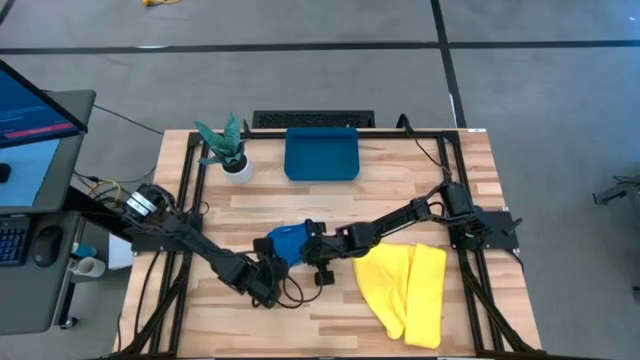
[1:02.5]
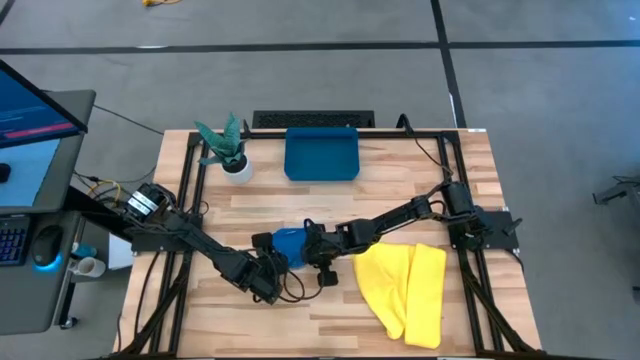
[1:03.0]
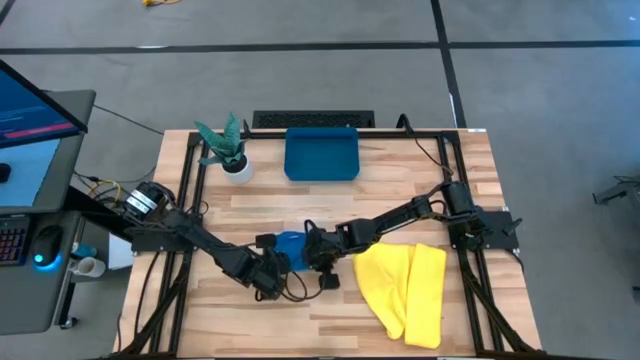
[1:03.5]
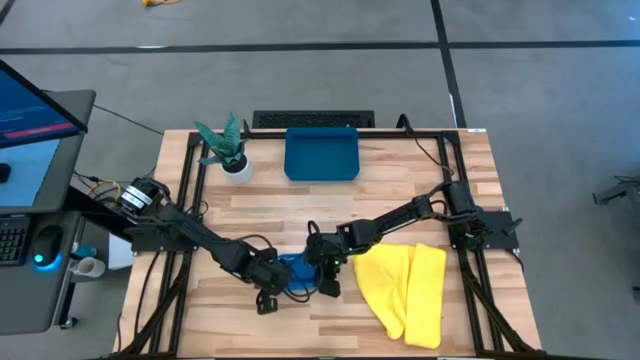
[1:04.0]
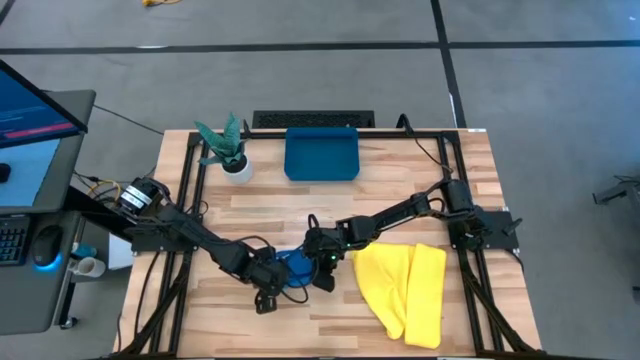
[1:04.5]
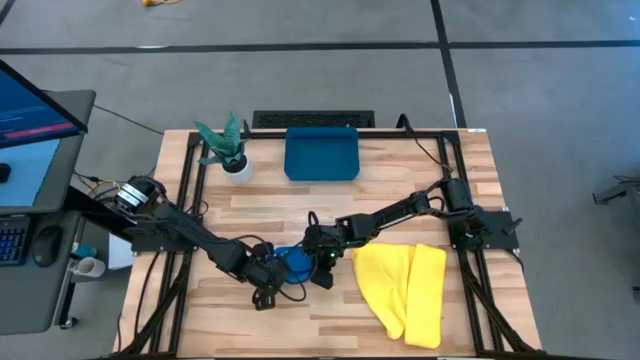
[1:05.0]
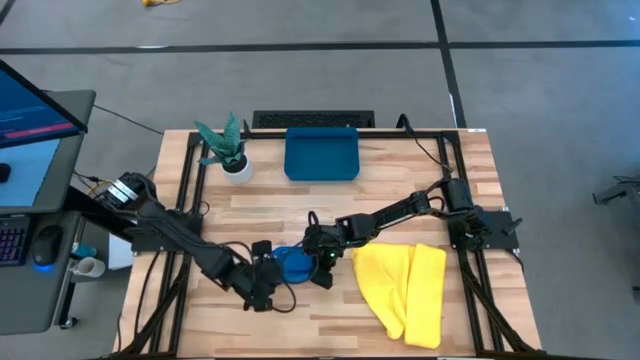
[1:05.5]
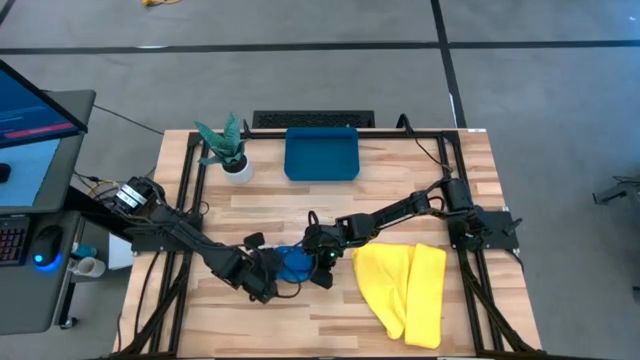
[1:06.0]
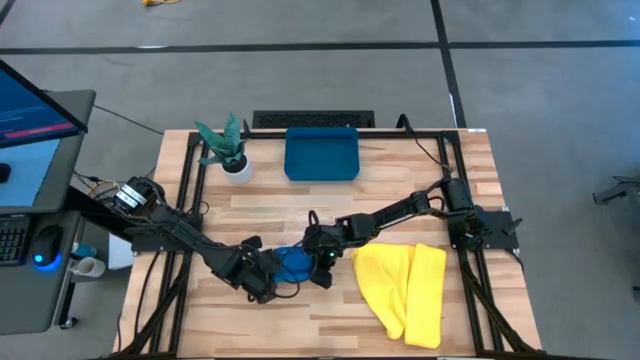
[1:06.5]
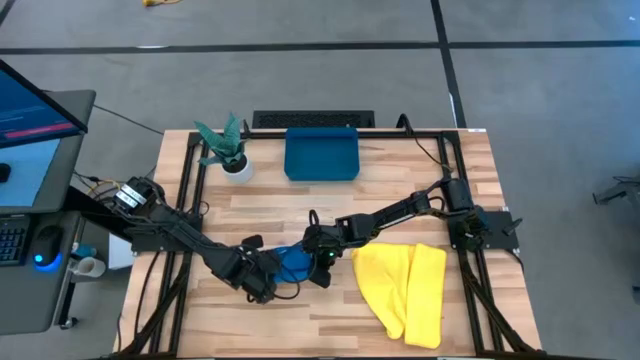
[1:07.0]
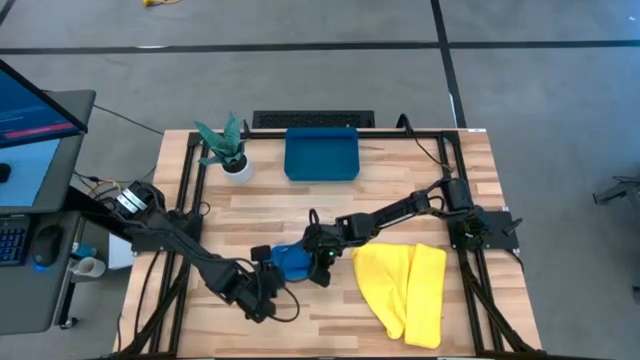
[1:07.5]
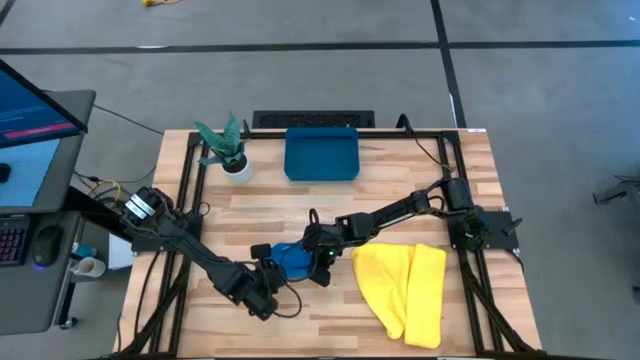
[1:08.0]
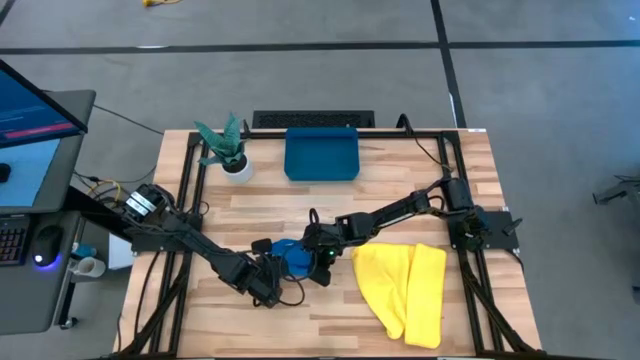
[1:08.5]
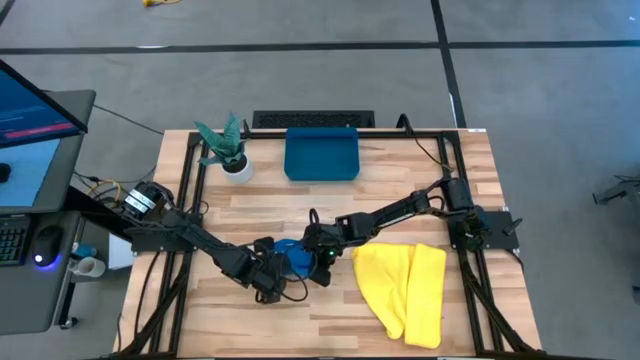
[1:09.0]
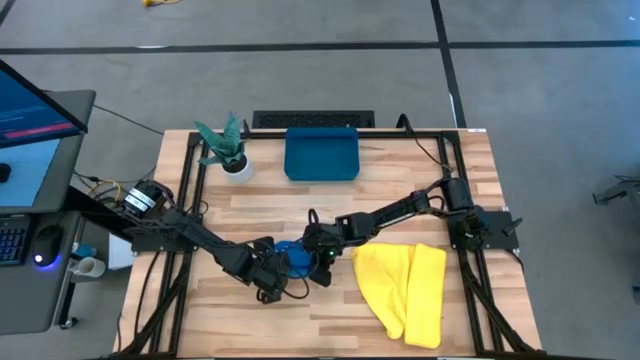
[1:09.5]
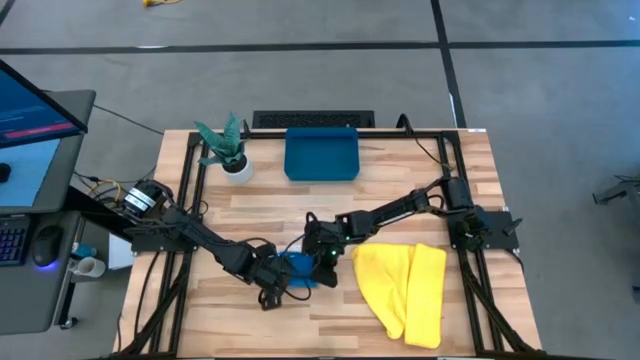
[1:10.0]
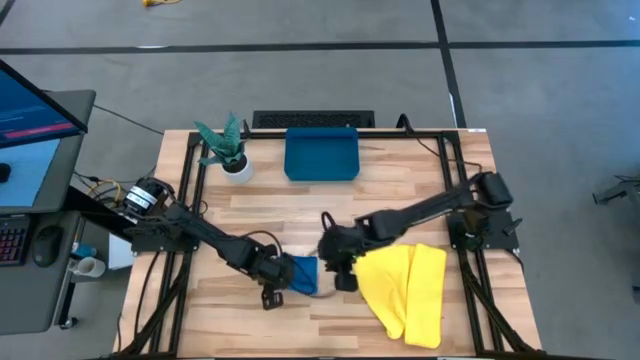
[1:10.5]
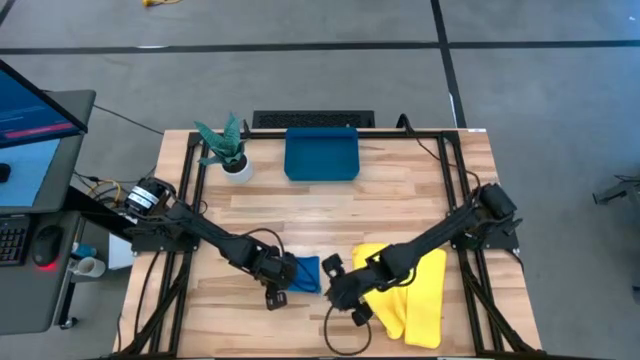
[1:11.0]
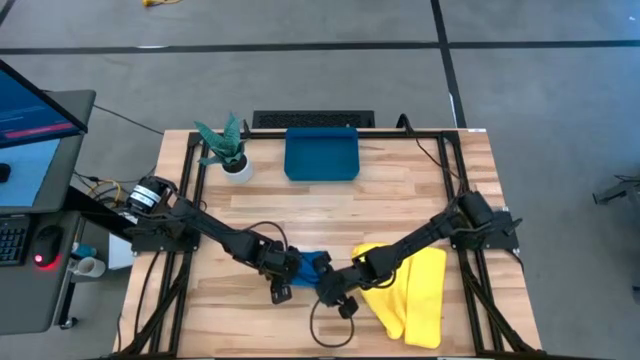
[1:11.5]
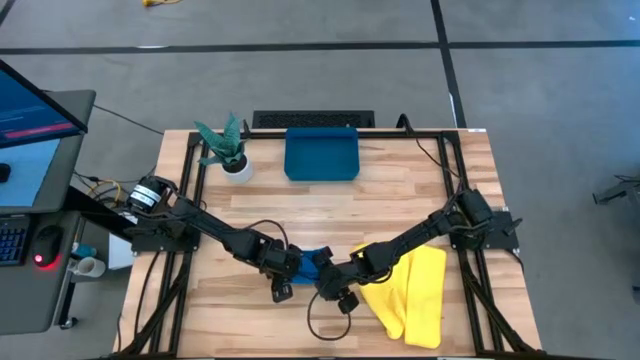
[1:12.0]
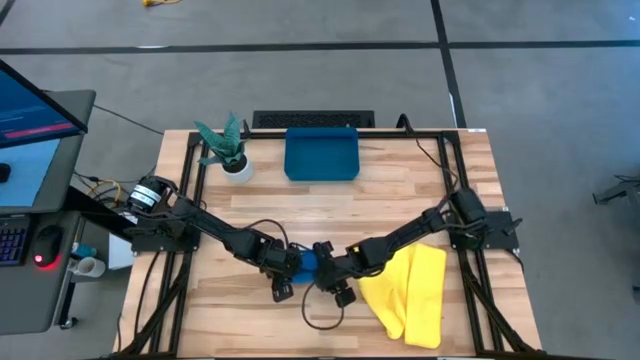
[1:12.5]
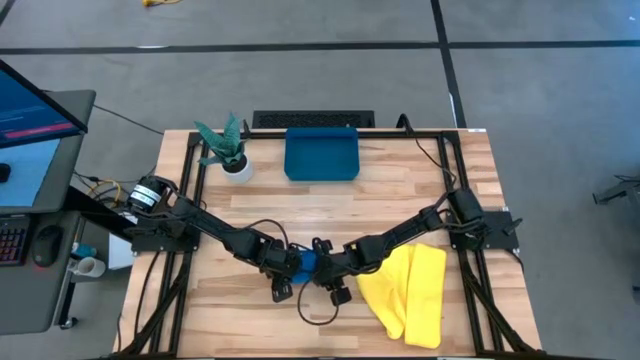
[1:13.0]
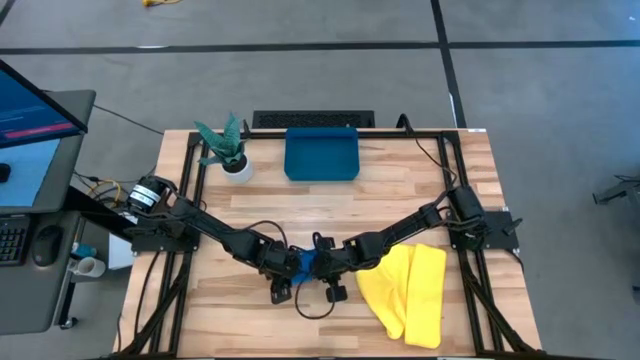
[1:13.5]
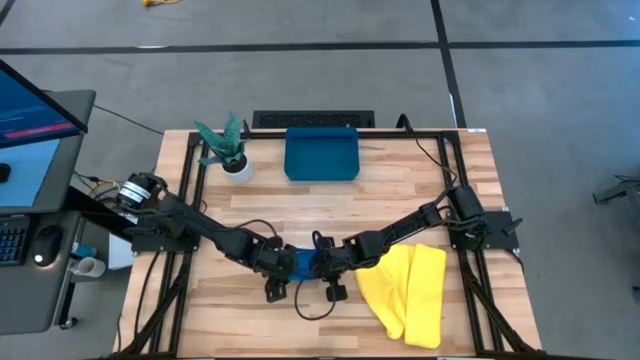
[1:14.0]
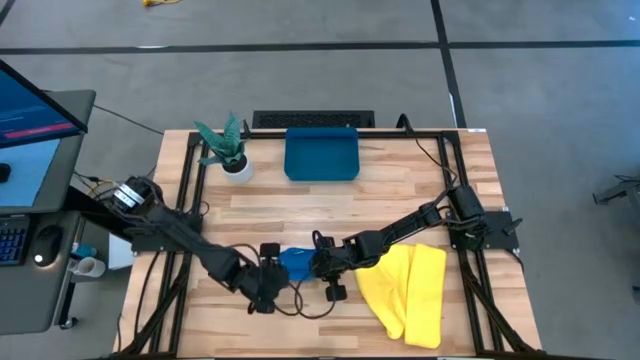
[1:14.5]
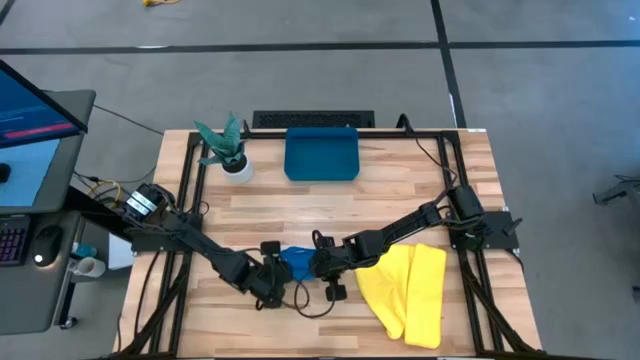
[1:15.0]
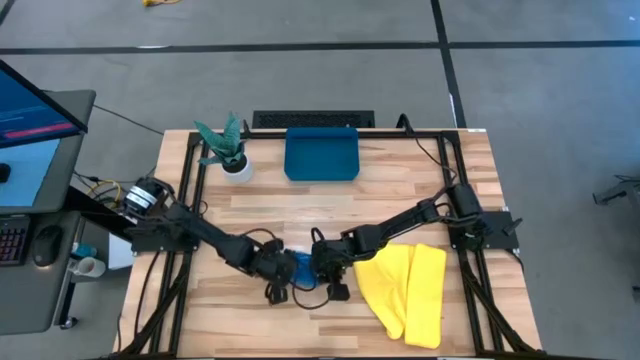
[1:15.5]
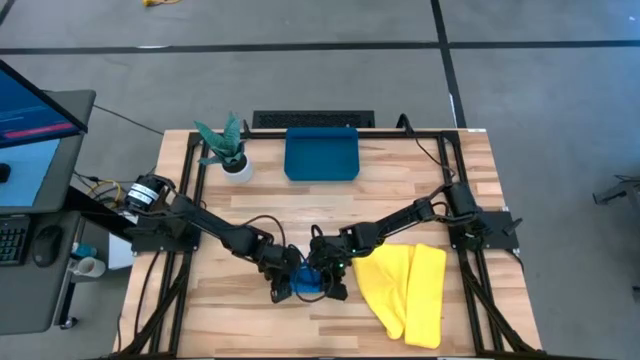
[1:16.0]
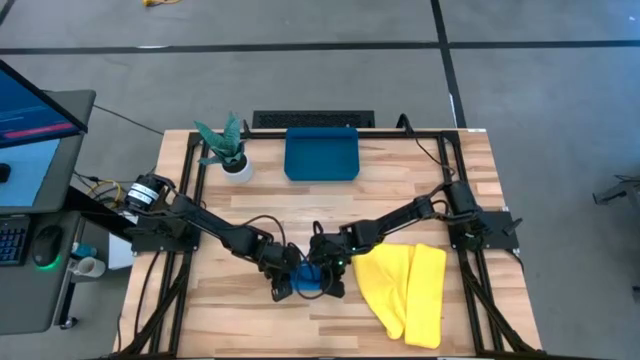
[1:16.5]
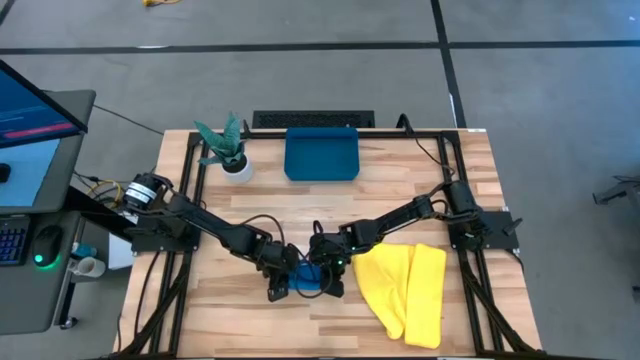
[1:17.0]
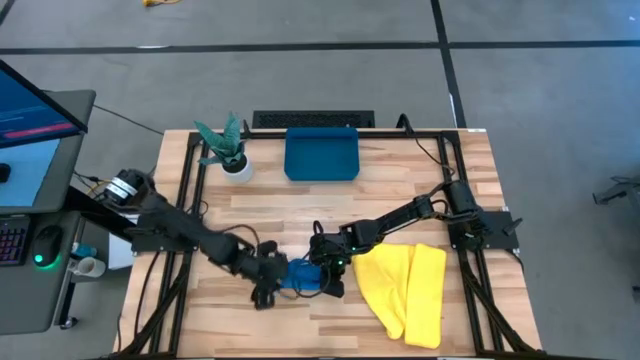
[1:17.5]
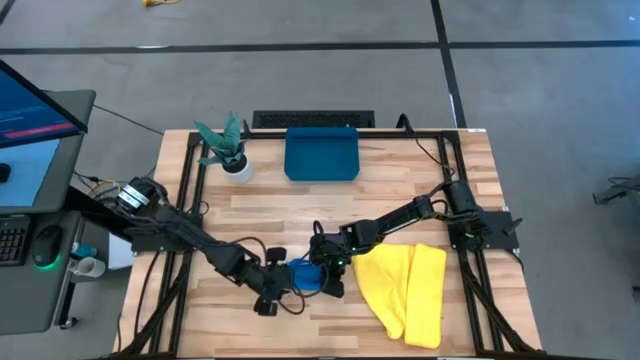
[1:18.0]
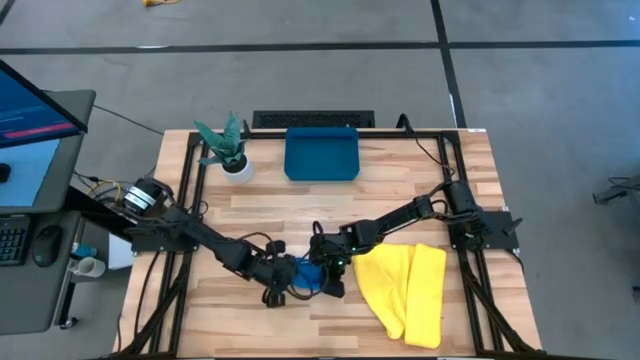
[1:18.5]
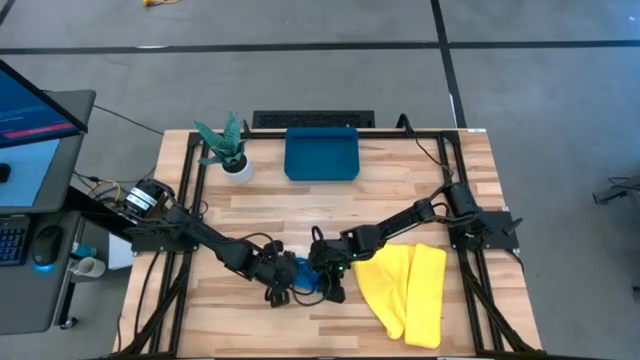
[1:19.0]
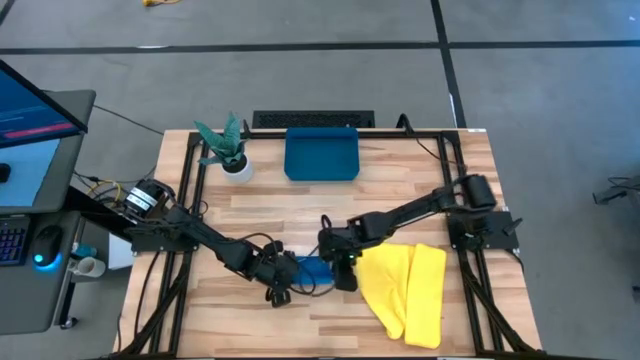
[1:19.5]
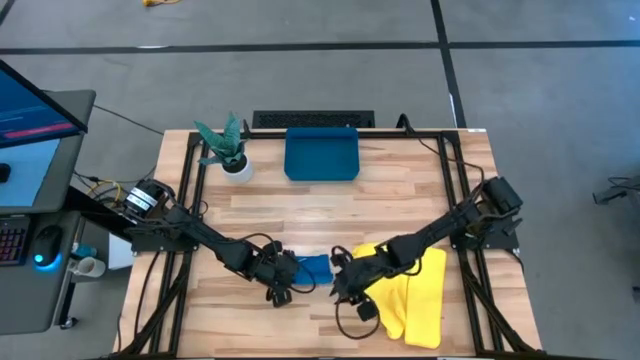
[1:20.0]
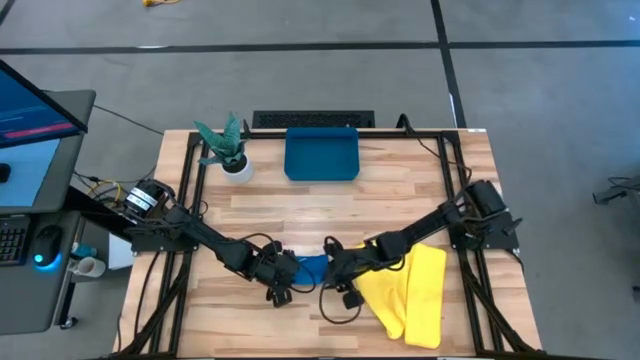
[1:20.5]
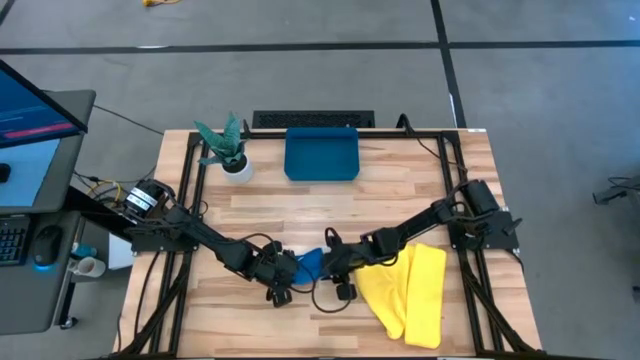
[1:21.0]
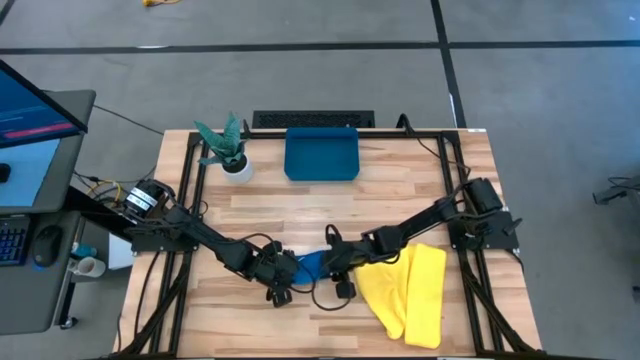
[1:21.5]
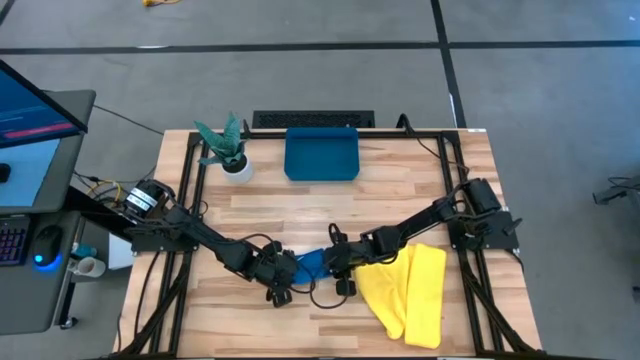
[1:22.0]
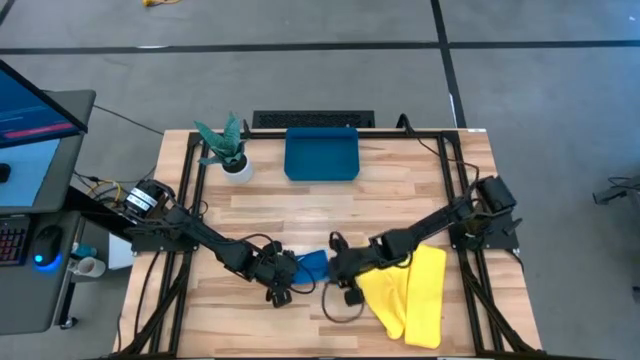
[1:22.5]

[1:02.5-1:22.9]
Task: Roll microfiber towels into tight, uniform cylinder then place into a basket
Roll the blue microfiber towel
